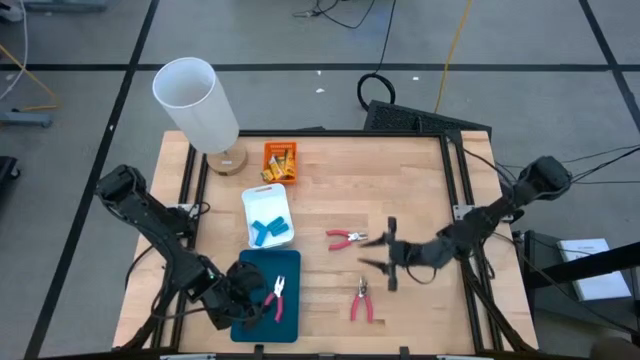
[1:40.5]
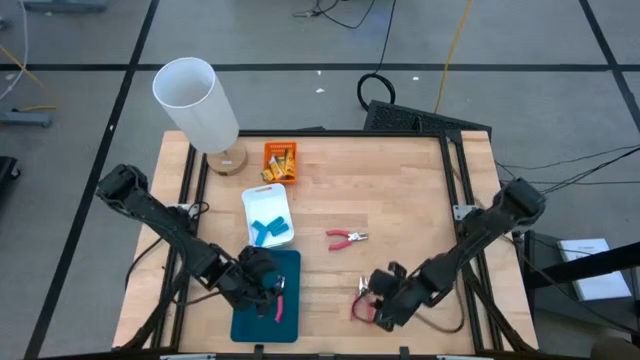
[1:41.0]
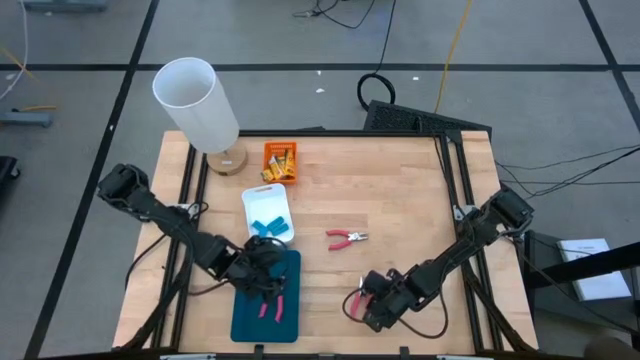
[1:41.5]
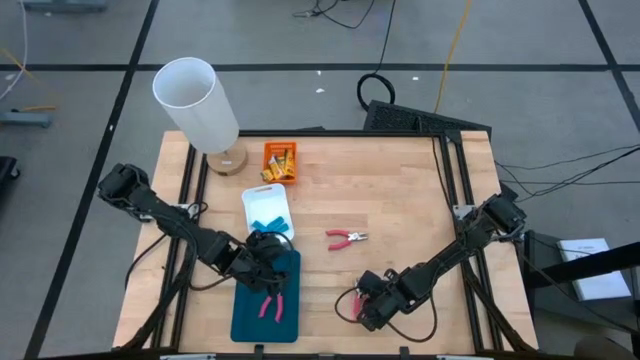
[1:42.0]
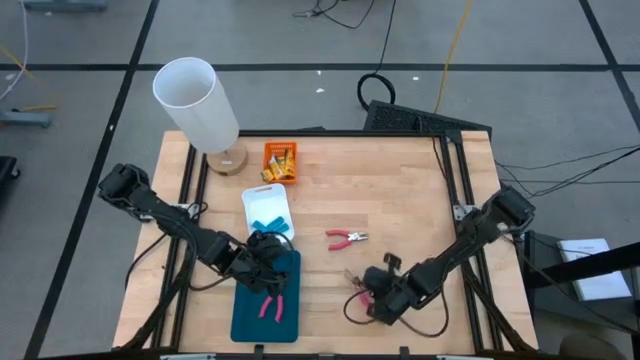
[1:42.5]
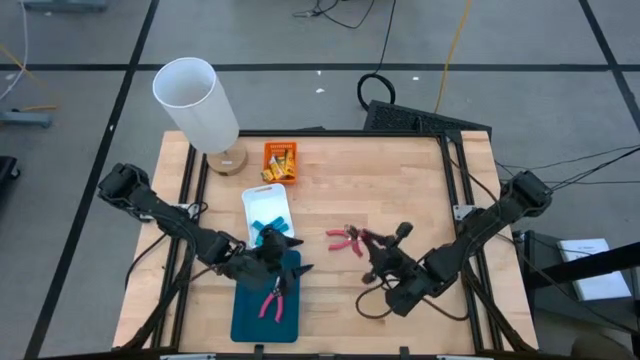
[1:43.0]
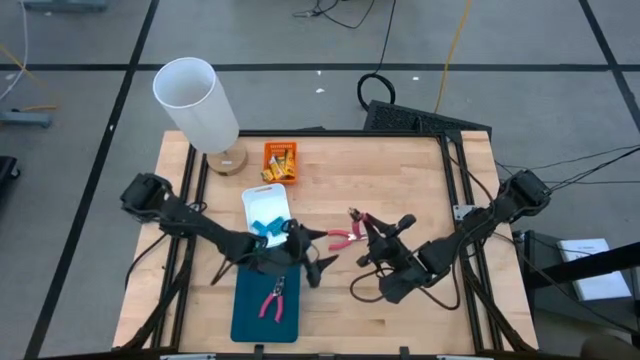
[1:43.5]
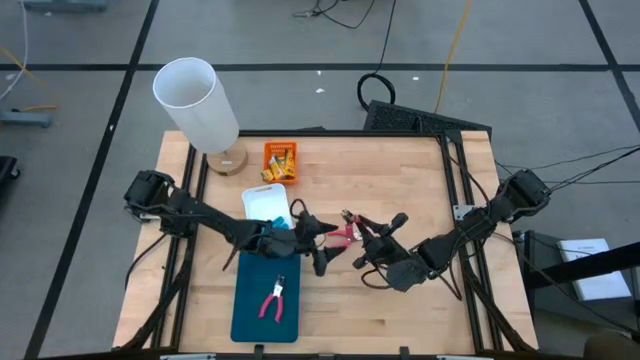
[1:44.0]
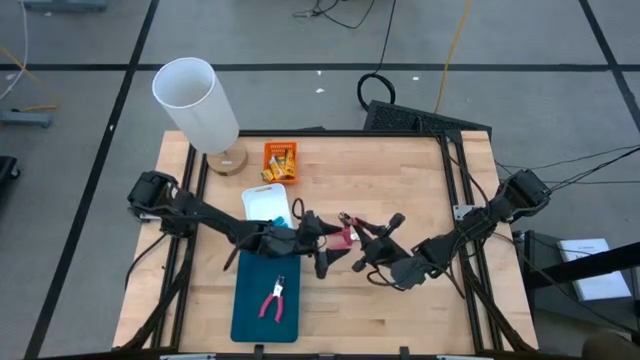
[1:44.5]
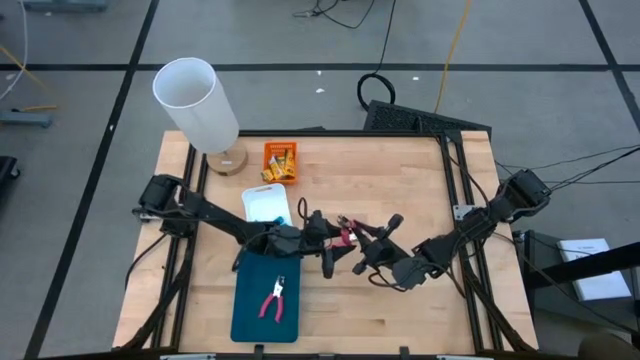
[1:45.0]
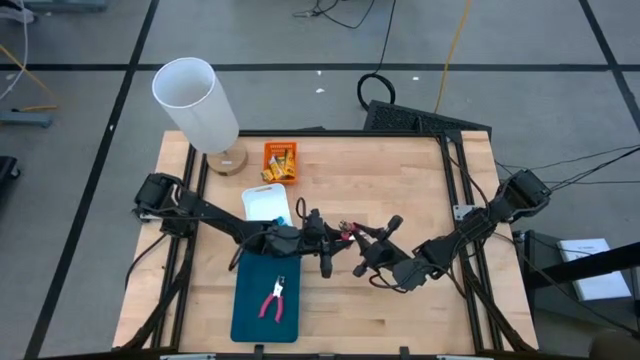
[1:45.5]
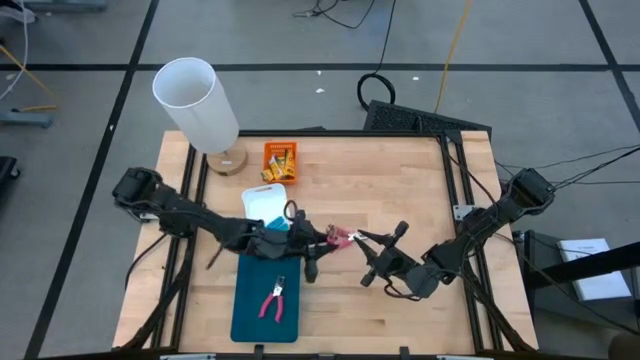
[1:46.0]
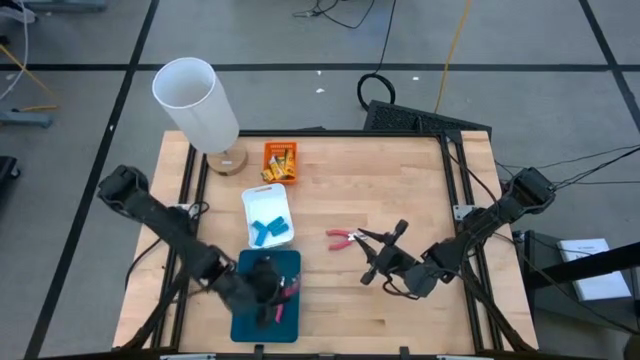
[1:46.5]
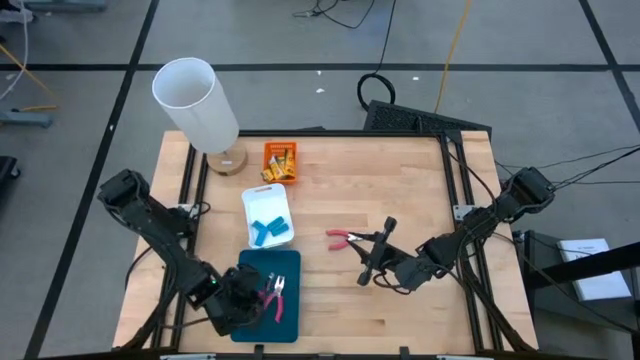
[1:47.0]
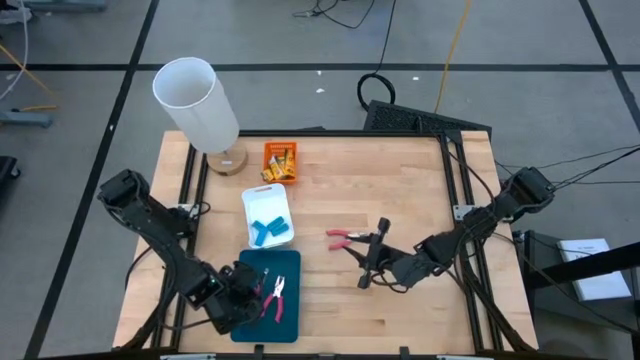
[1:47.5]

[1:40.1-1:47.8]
Task: Pick & Place School Supplies
Put the pink hole puncher into the blue bin

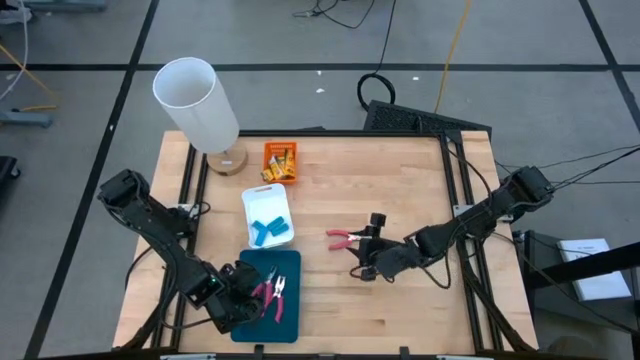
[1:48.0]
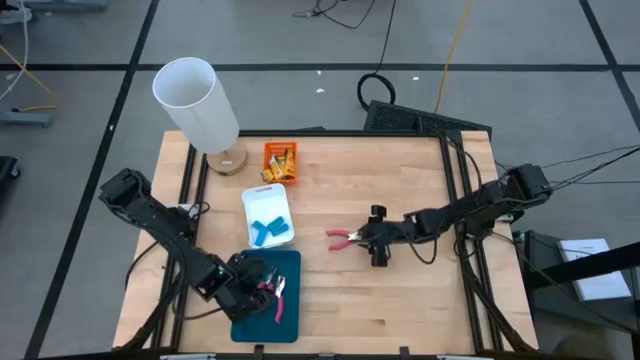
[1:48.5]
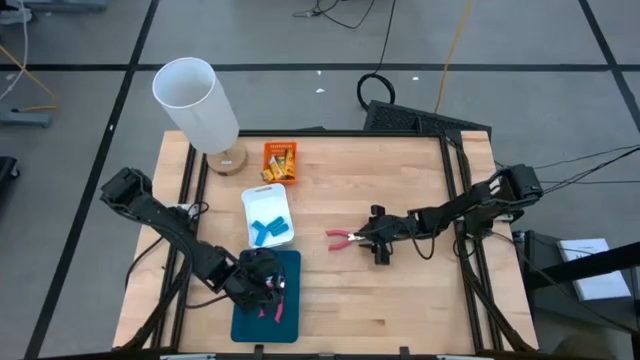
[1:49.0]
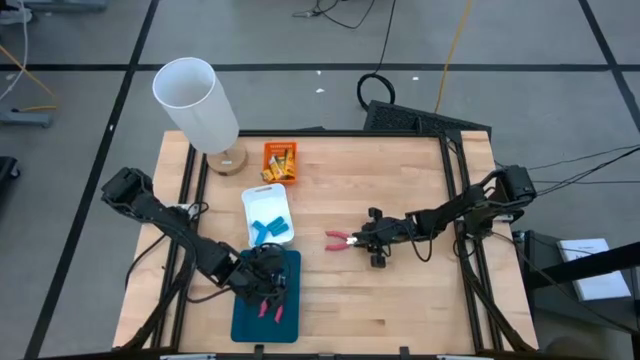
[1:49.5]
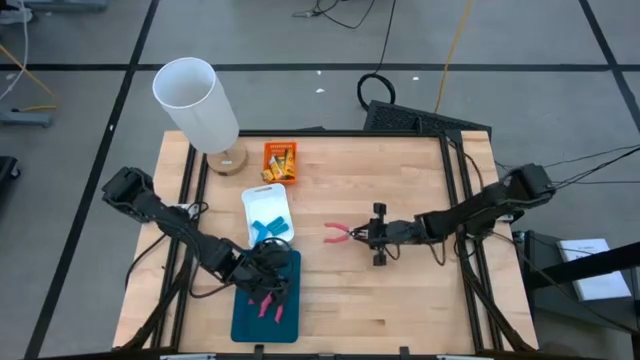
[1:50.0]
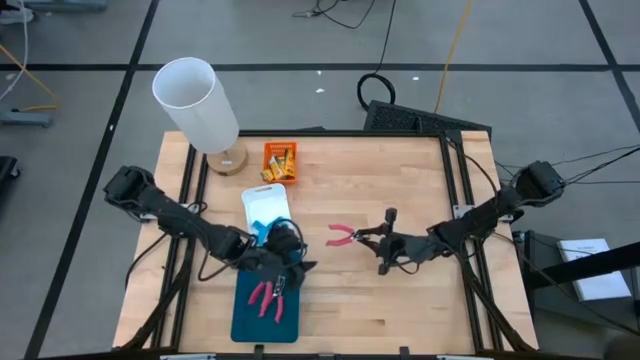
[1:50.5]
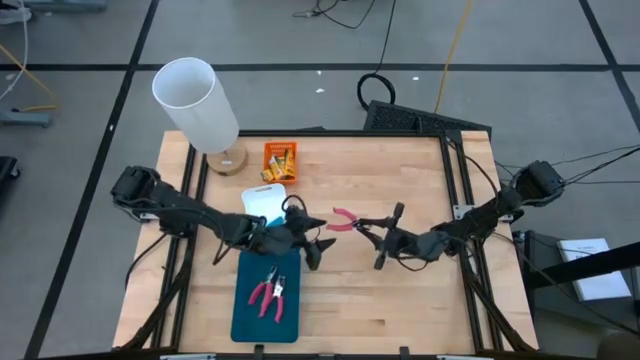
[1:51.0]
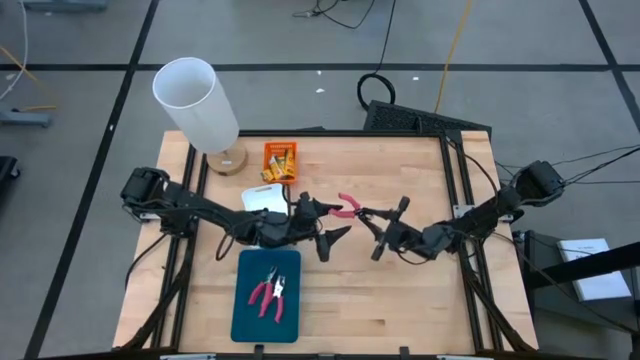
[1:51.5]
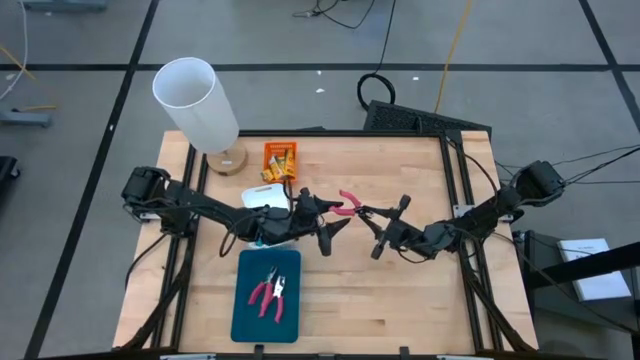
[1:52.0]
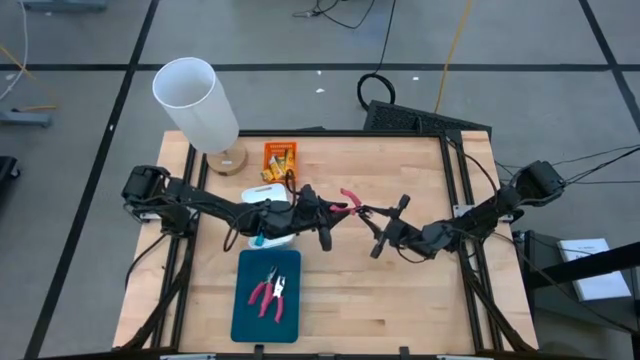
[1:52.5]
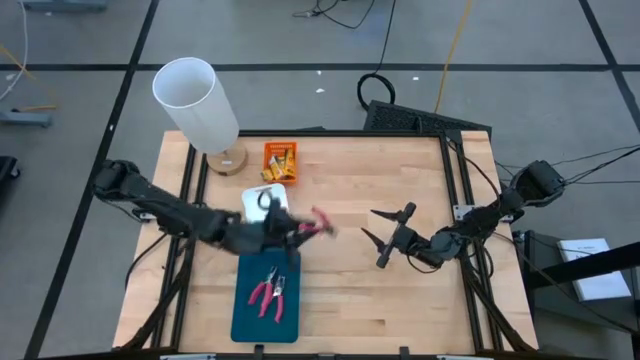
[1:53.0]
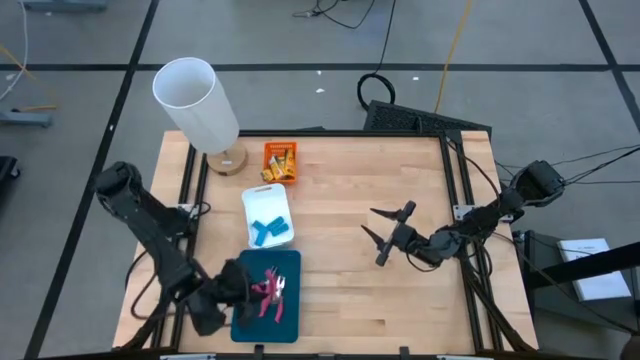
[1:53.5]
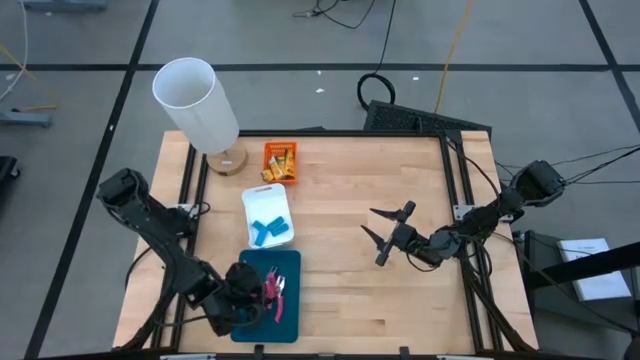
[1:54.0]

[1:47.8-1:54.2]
Put the pink hole puncher into the blue bin

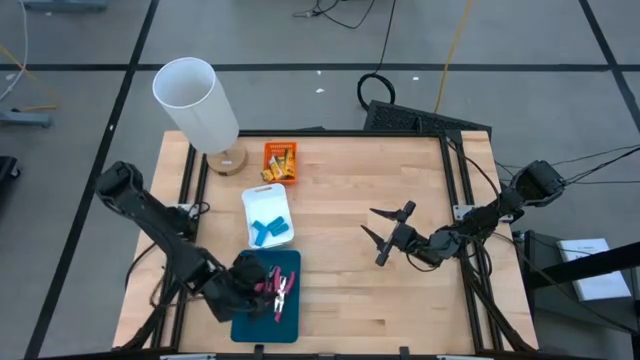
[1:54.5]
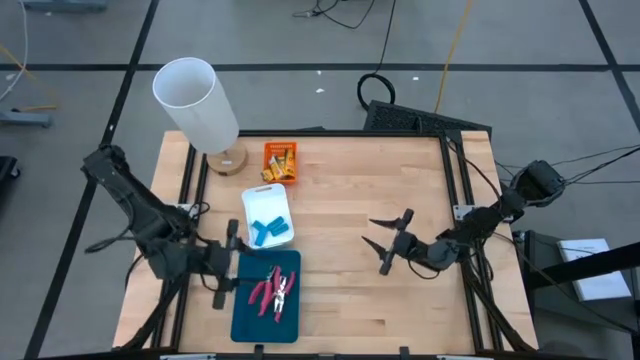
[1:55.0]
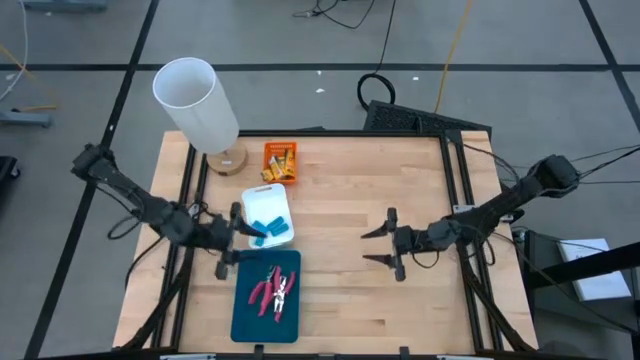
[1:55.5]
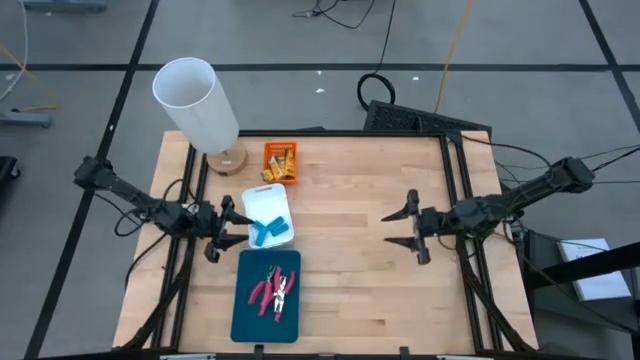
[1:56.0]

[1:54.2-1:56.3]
Return to Home Position

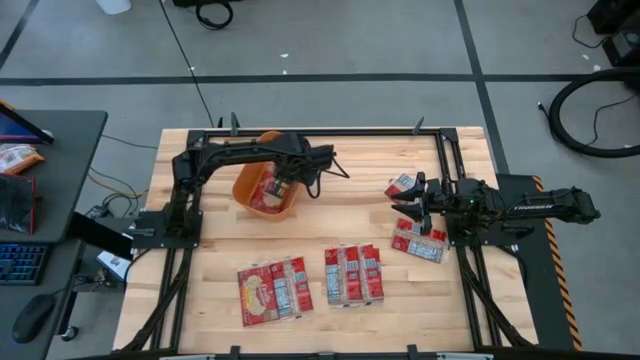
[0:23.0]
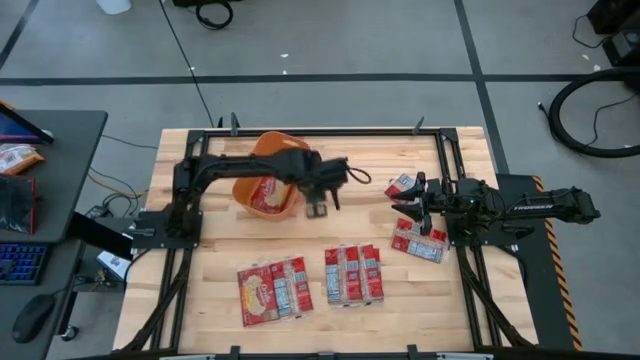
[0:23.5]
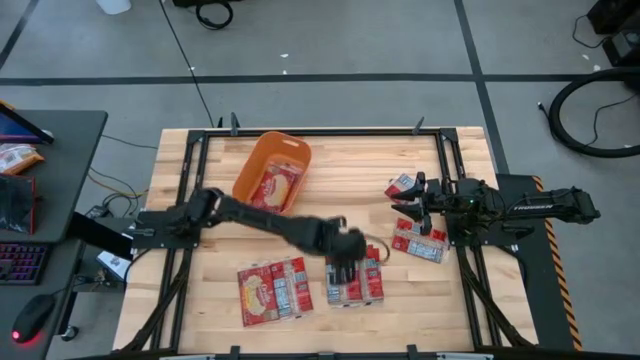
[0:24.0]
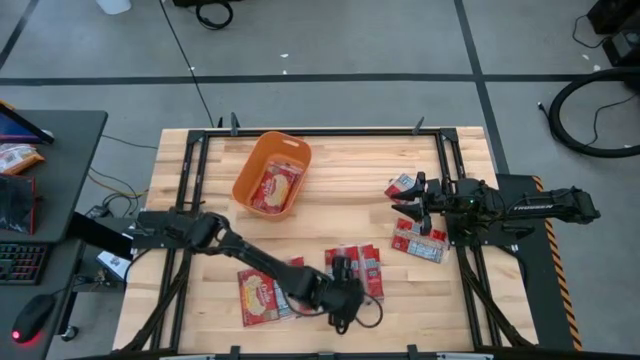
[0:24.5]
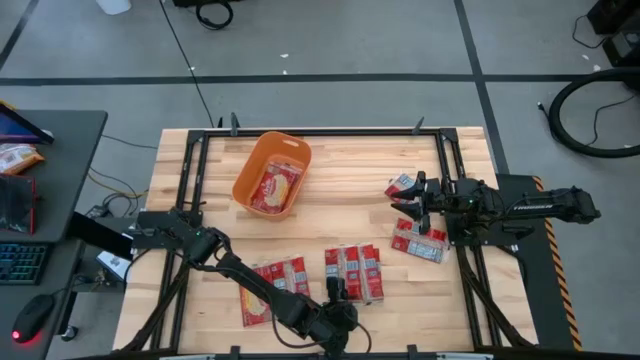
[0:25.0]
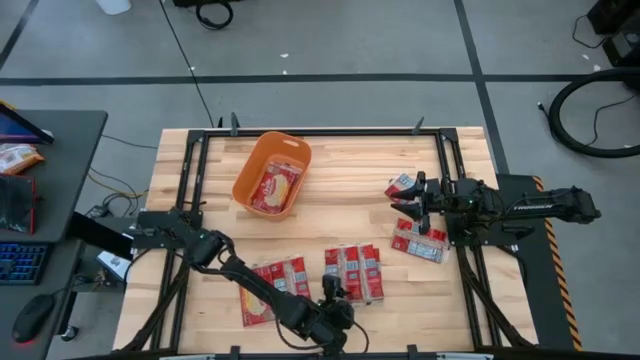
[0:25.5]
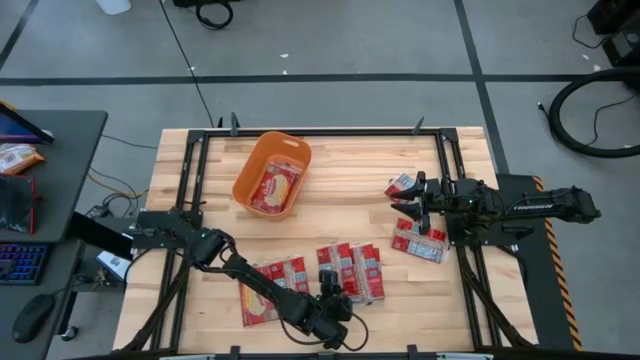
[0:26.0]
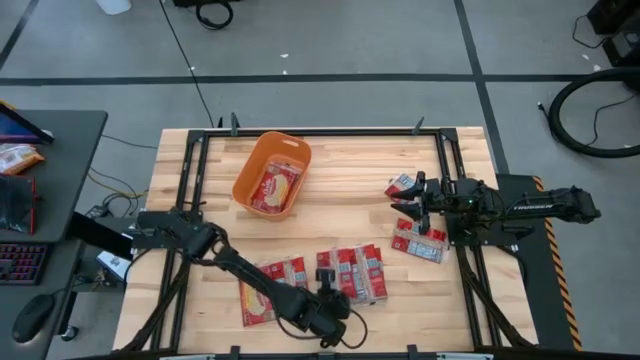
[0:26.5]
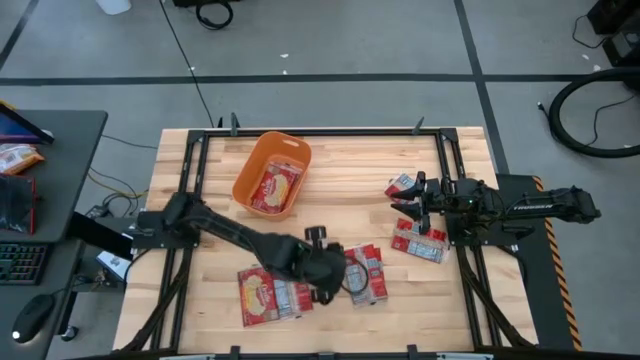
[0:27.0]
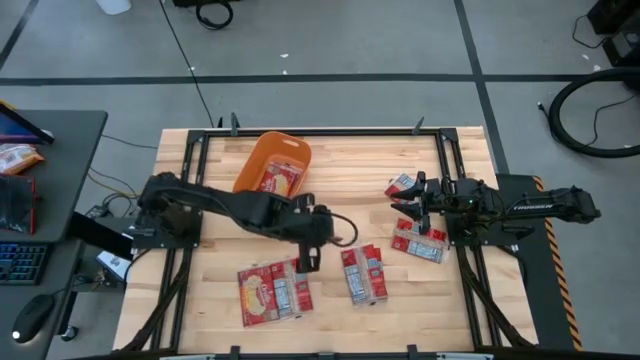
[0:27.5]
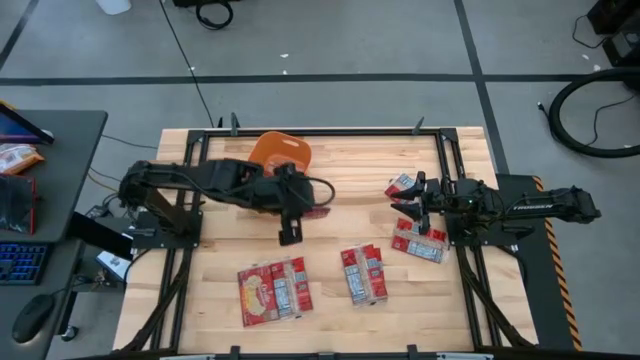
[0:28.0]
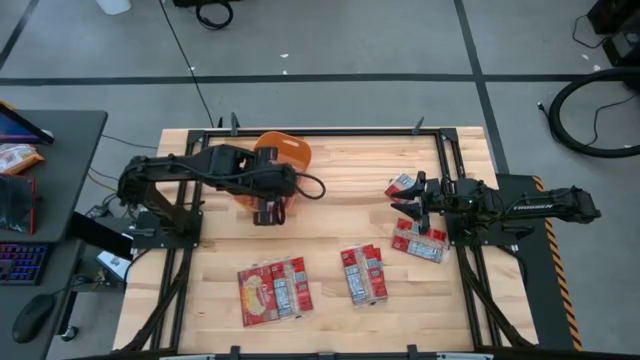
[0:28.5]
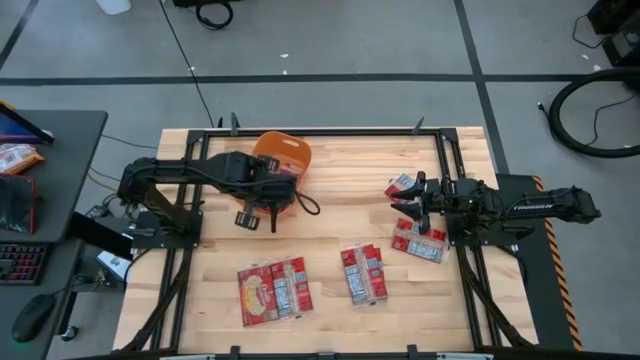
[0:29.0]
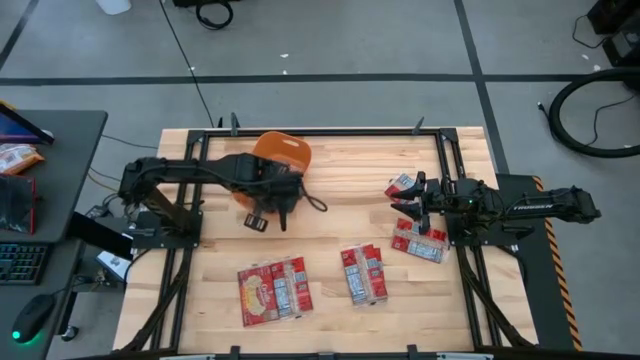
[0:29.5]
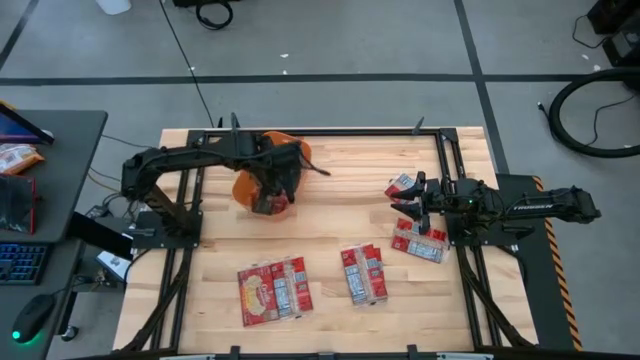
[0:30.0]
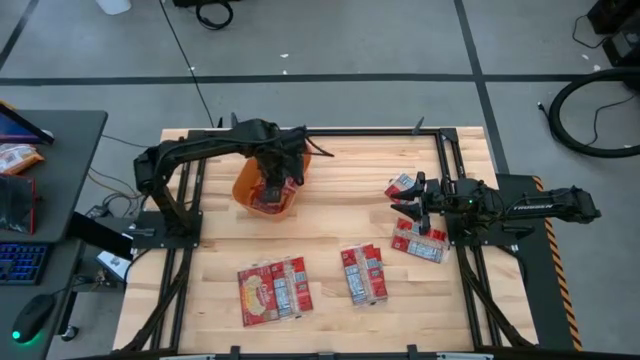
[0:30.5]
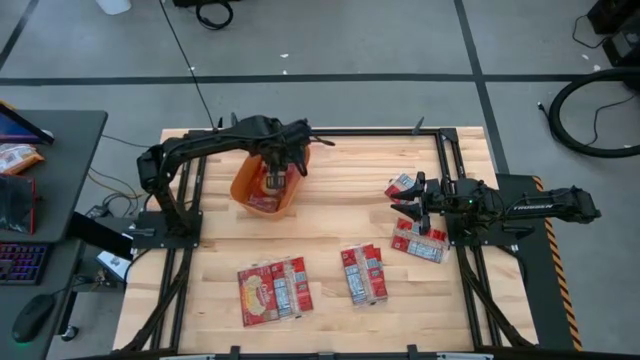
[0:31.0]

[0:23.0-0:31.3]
Task: Sort popcorn bags into baskets
Stack the popcorn pack on top of the other popcorn into the orange bin
